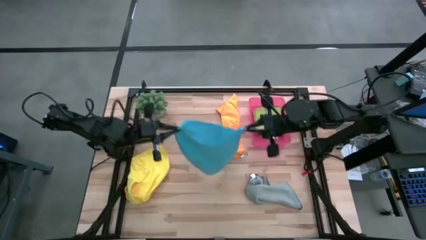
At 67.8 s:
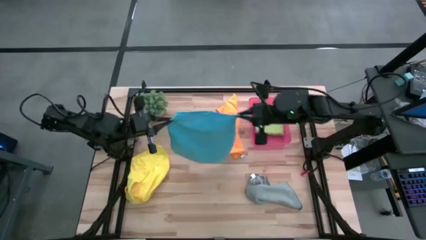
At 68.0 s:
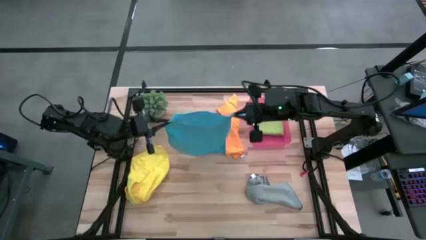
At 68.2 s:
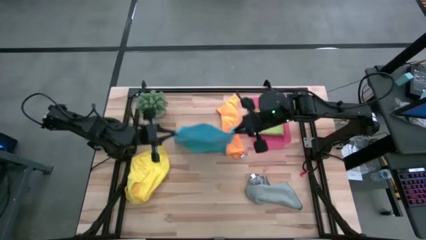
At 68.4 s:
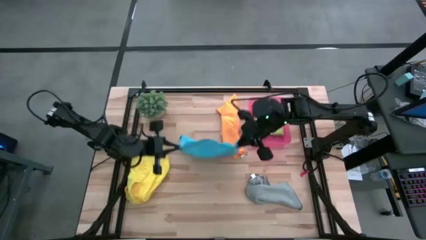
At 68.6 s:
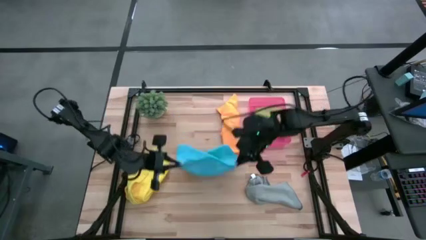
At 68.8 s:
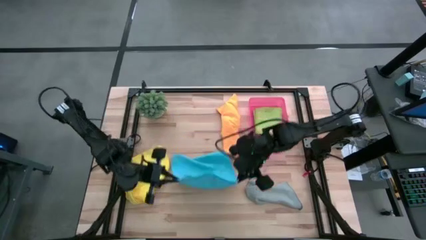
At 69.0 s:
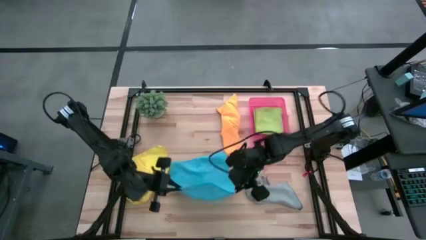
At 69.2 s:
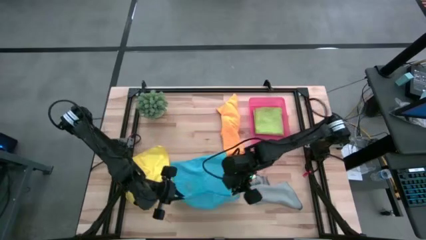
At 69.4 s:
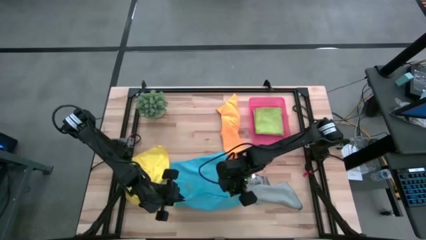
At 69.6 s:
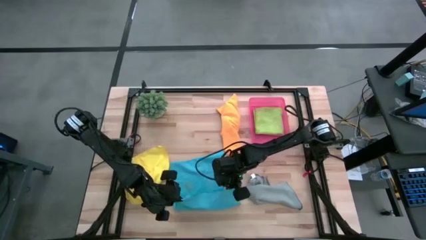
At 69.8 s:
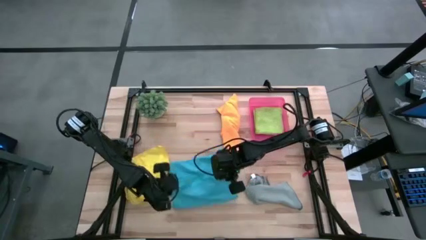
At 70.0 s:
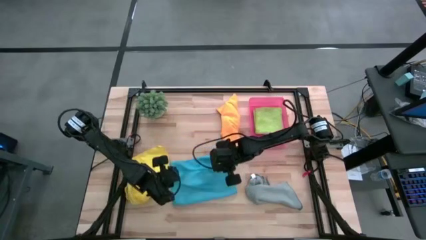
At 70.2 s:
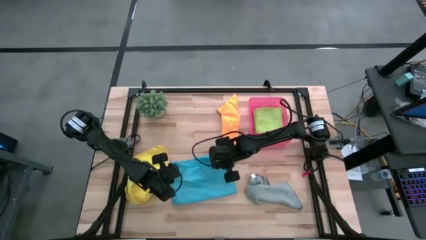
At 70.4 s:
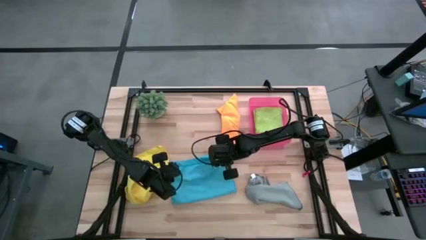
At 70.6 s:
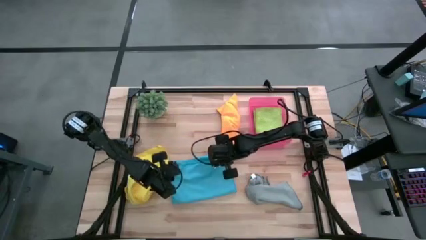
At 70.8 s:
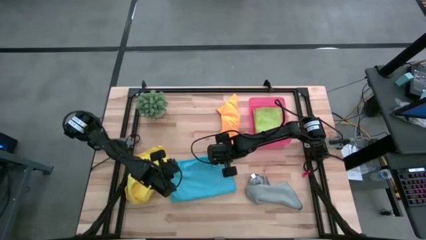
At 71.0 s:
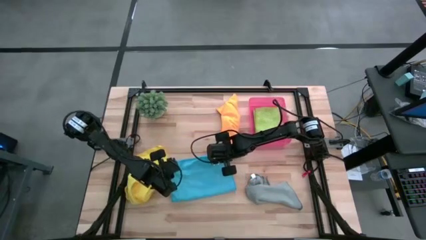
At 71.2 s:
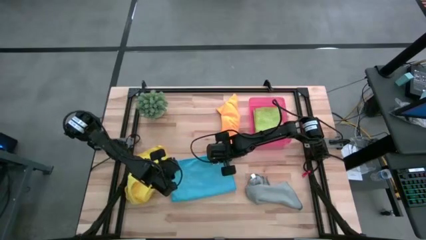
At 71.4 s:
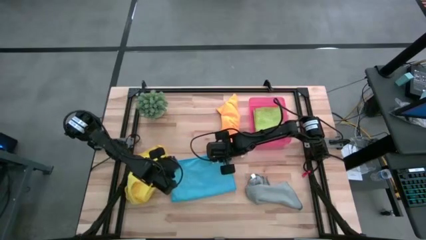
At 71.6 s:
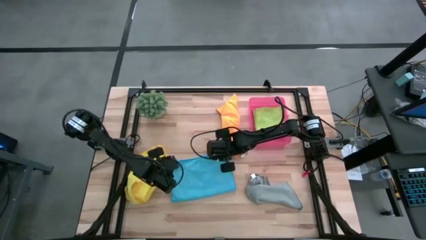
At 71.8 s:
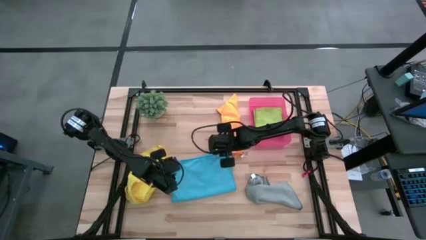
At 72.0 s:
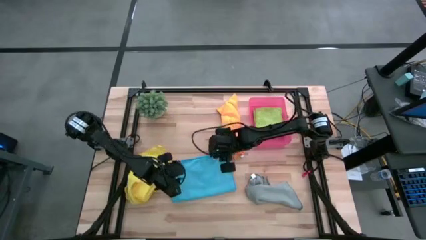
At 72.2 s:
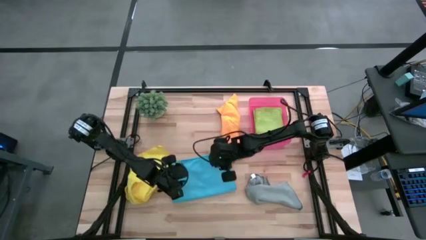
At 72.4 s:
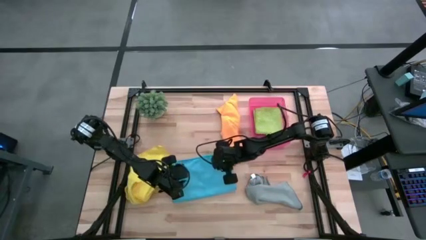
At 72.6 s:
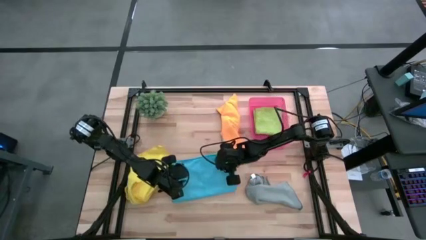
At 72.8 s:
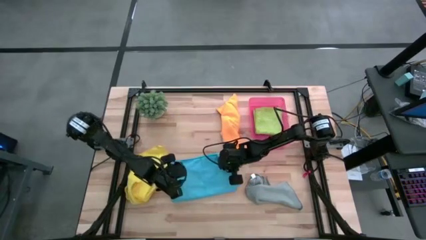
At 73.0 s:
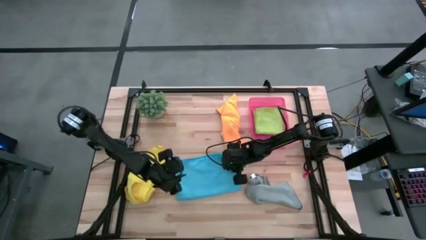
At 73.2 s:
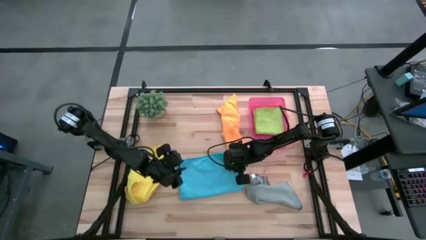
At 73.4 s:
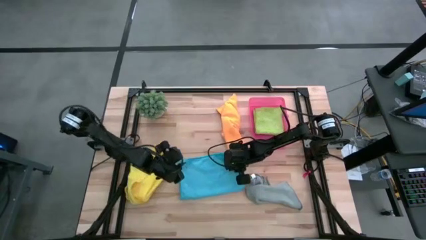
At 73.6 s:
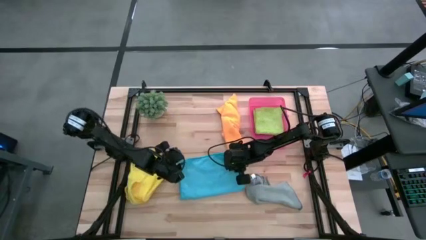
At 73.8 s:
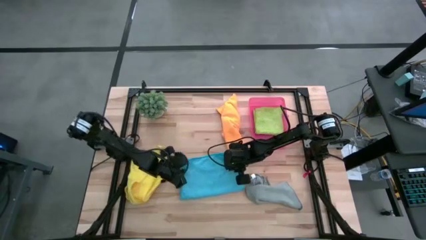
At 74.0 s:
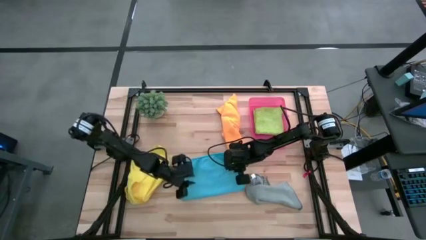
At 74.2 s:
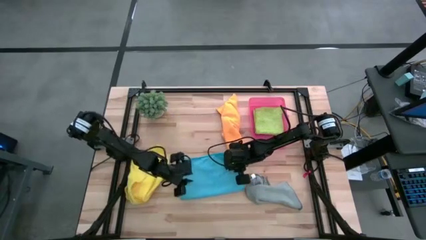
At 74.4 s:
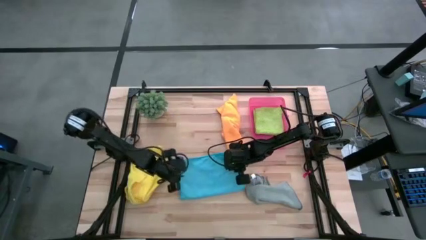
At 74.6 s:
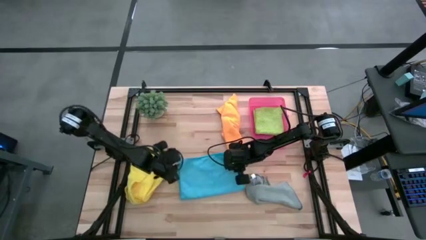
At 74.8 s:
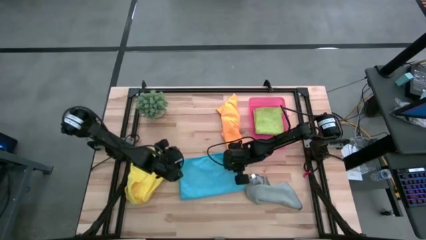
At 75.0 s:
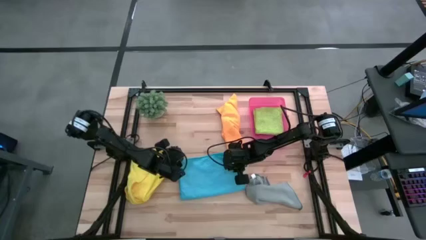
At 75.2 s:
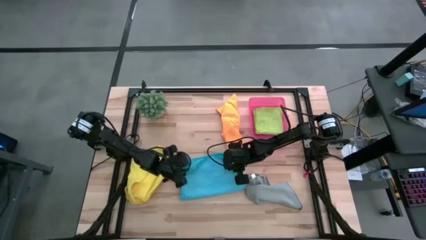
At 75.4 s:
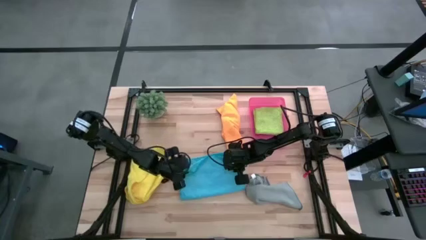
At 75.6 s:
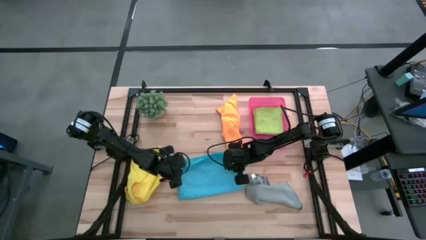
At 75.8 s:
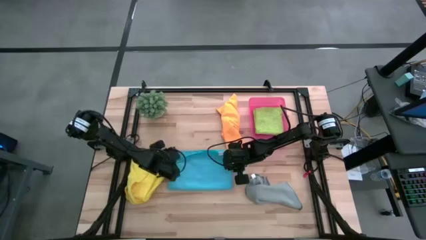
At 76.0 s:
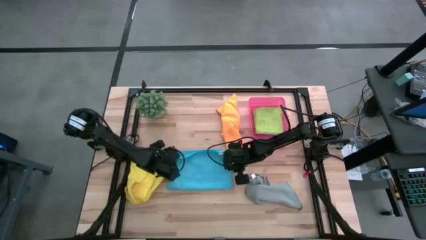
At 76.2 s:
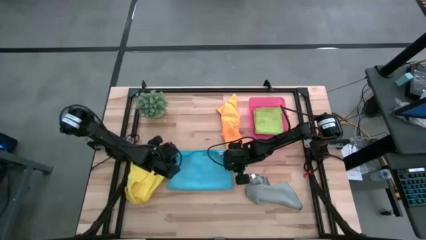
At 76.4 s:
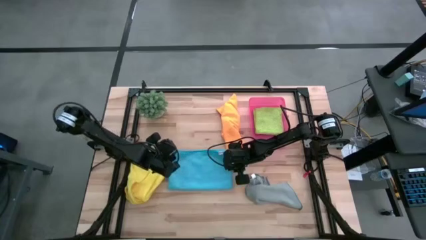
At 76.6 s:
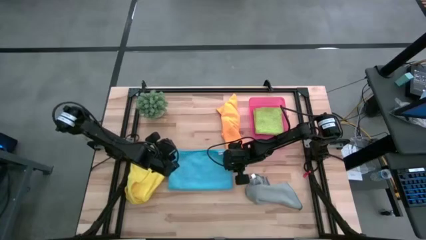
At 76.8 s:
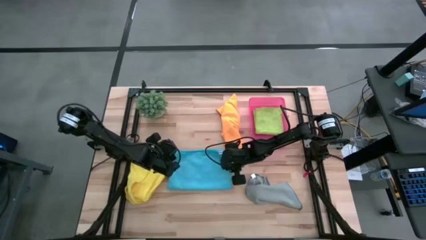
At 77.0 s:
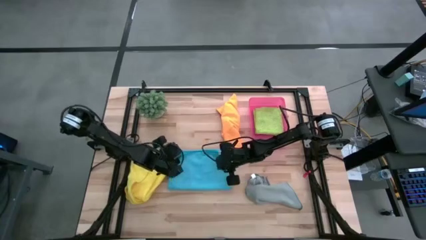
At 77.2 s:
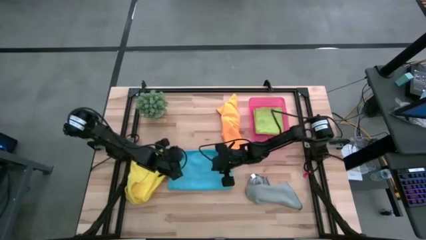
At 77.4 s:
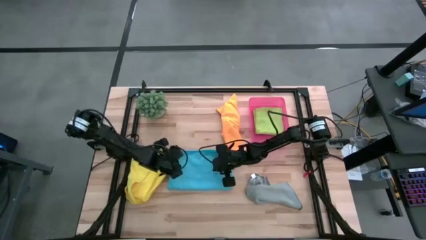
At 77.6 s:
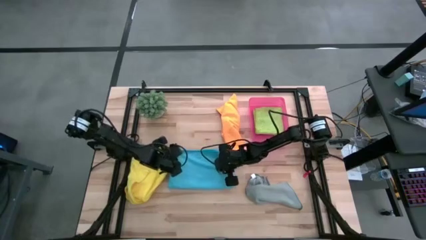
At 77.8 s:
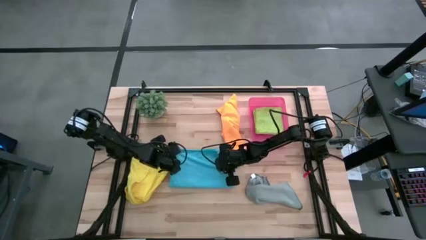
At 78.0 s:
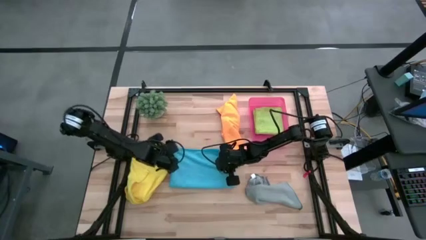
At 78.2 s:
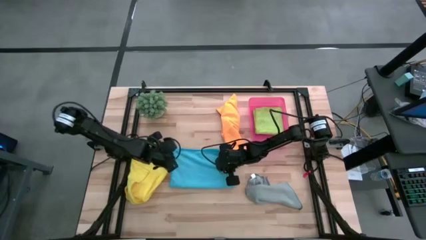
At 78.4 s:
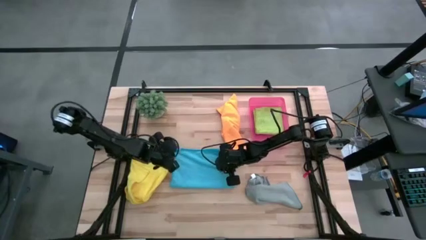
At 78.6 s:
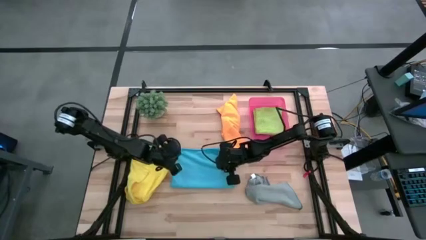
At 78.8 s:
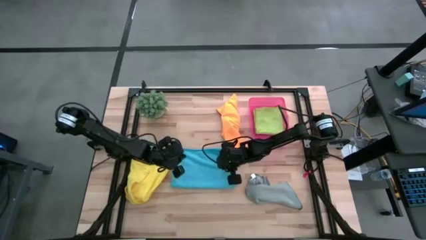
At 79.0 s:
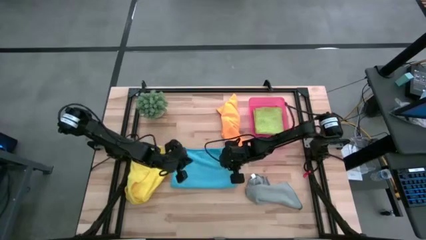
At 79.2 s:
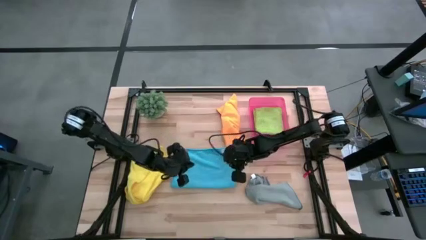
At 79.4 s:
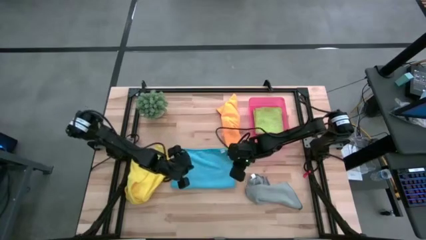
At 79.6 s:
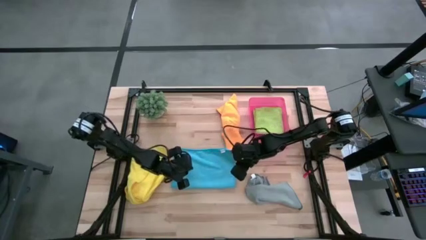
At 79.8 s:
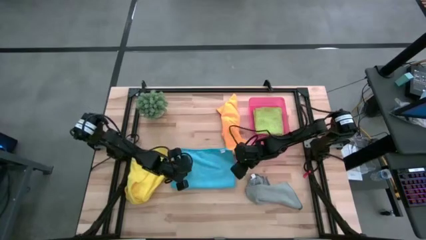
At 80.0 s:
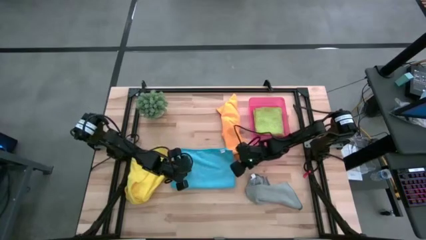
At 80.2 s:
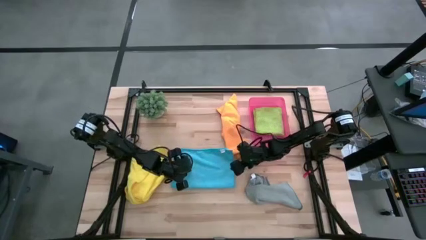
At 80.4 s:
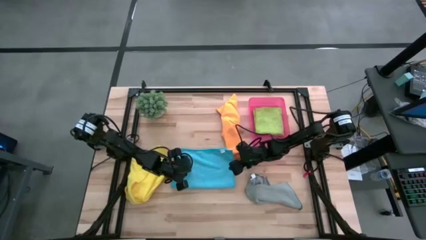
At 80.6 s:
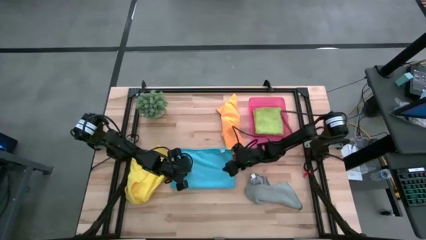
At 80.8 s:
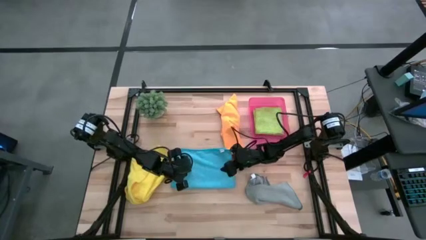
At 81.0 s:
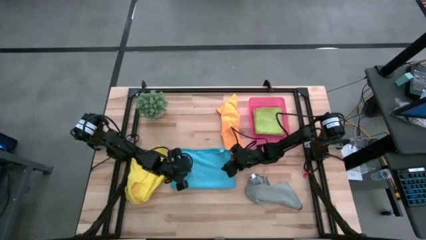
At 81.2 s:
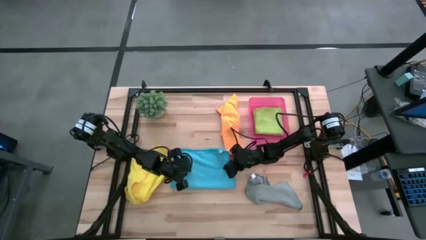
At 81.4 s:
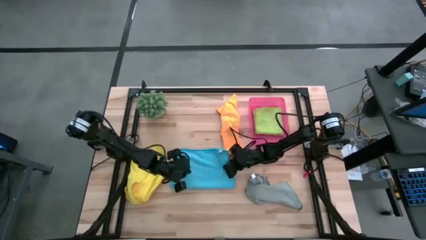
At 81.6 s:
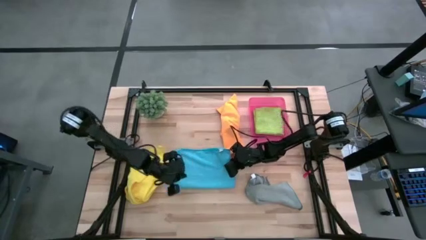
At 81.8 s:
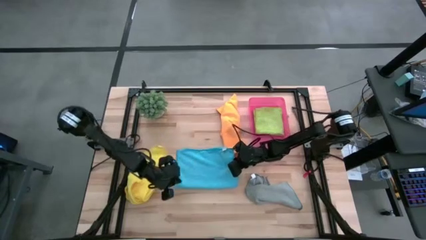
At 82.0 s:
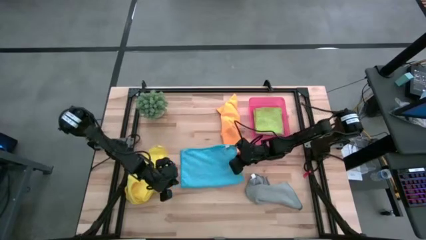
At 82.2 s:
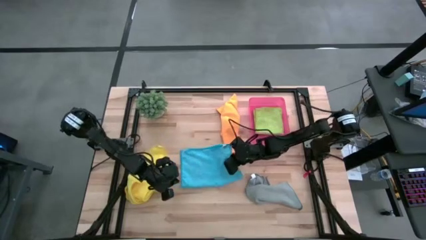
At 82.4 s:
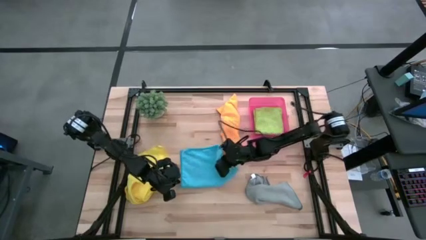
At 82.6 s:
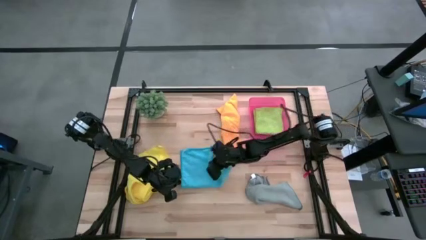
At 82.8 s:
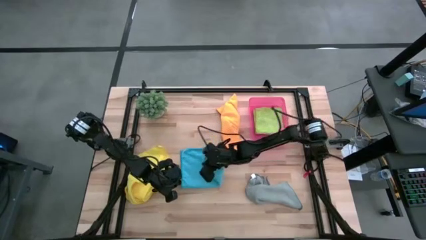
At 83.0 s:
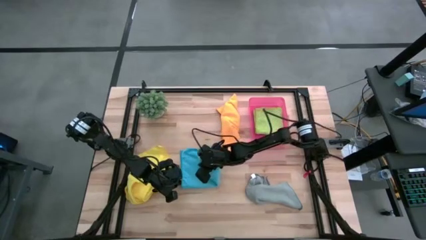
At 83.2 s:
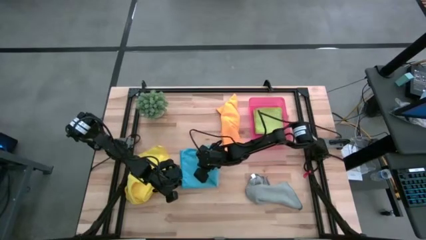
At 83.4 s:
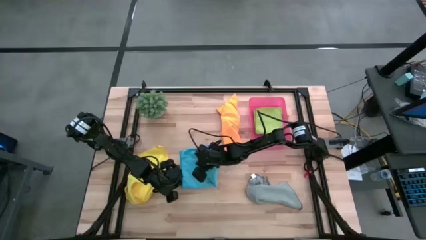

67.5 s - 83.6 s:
Task: Fold microfiber towels
Fold the blue microfiber cloth
